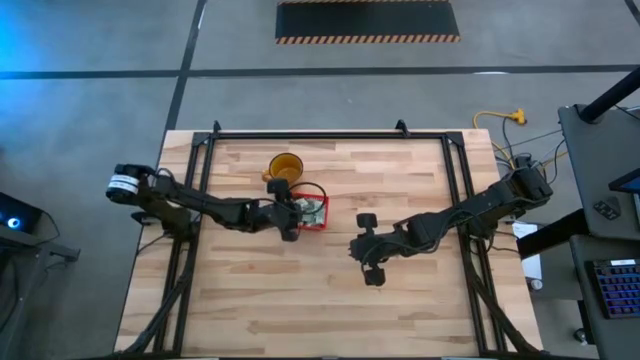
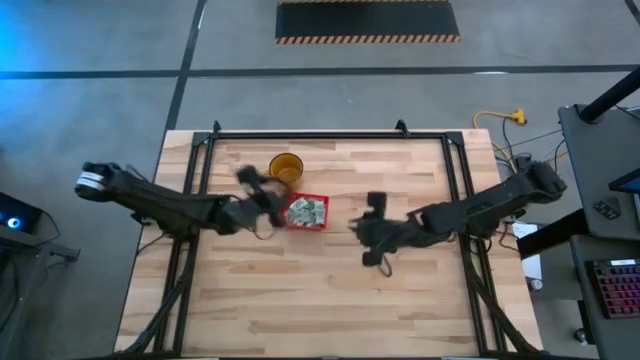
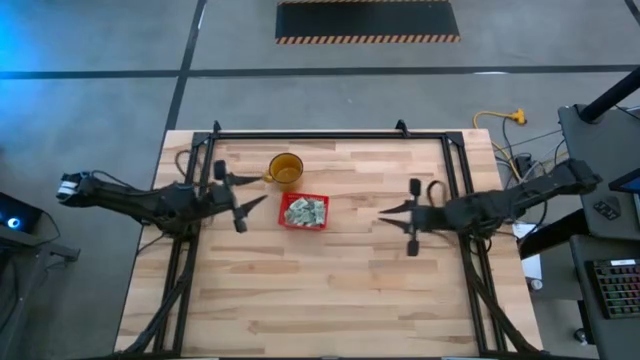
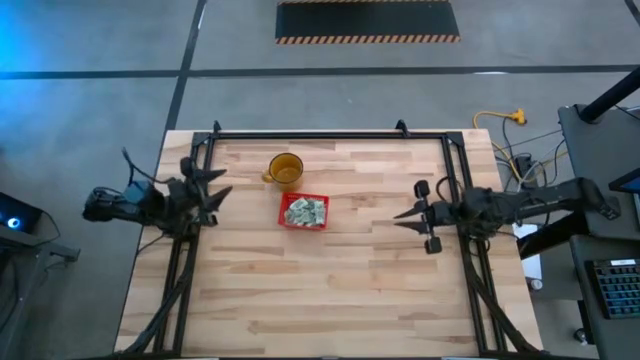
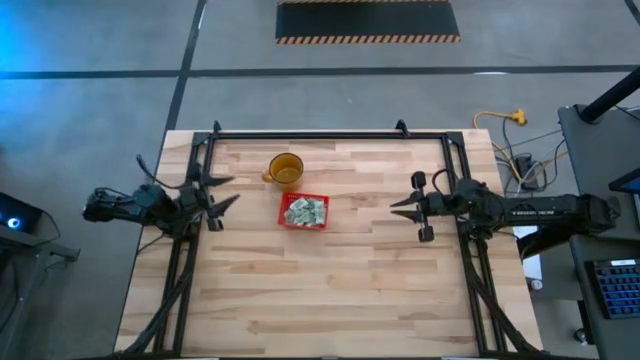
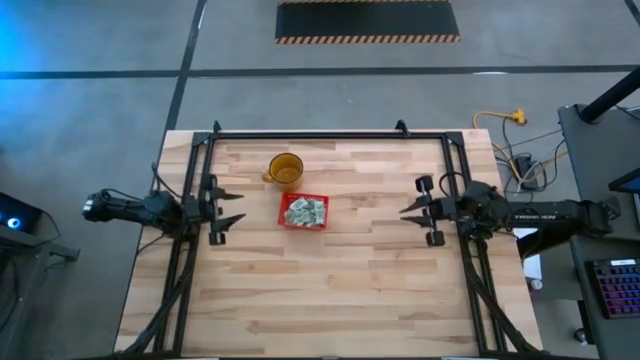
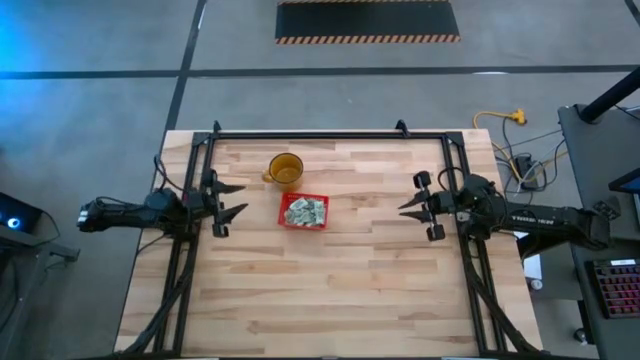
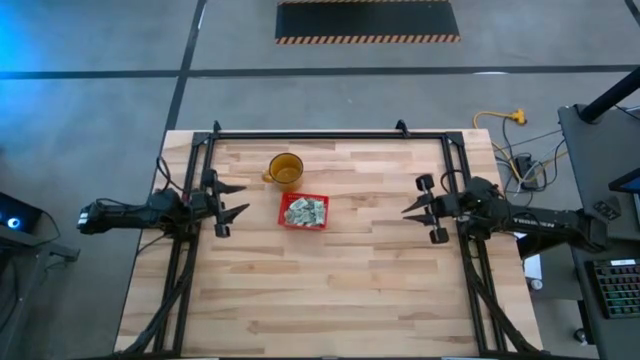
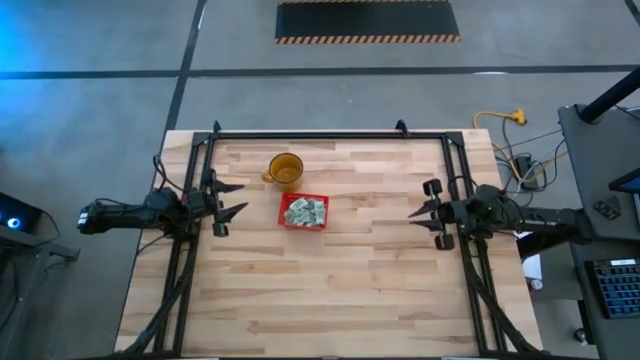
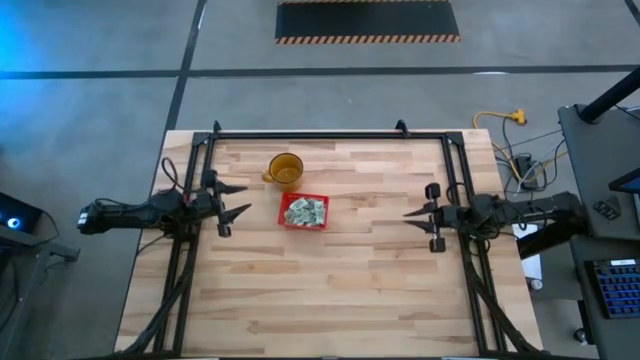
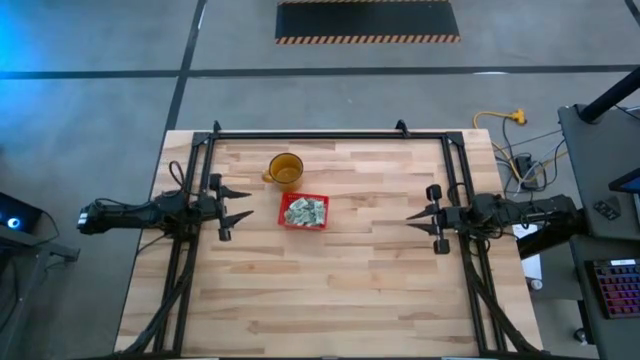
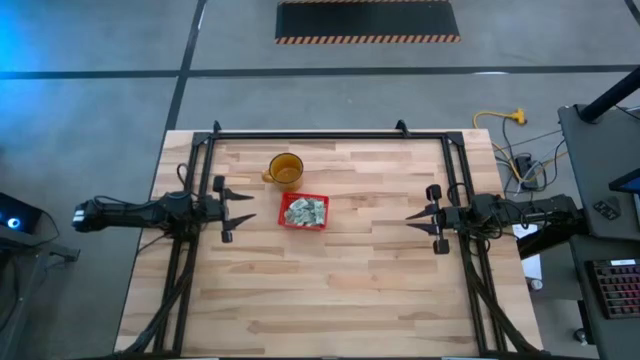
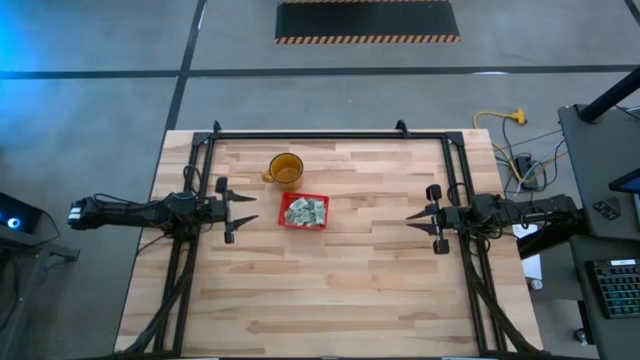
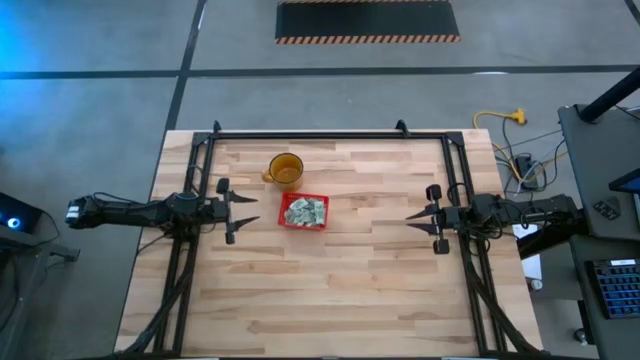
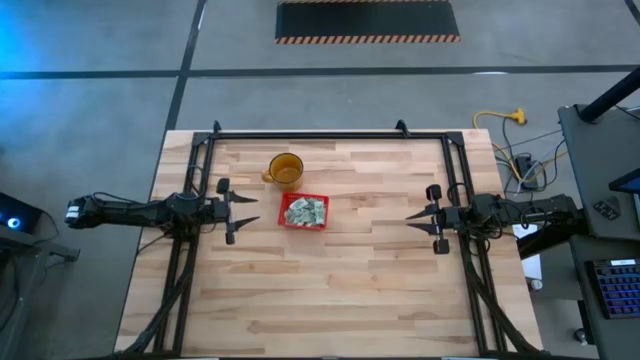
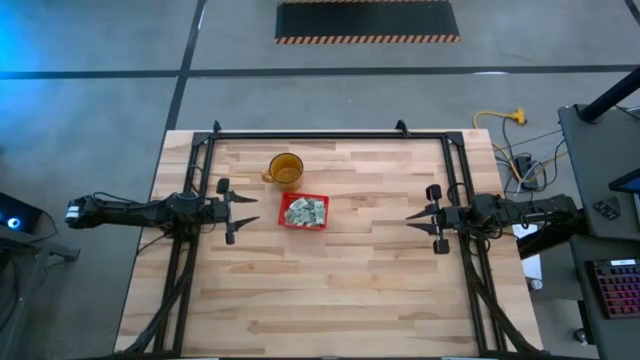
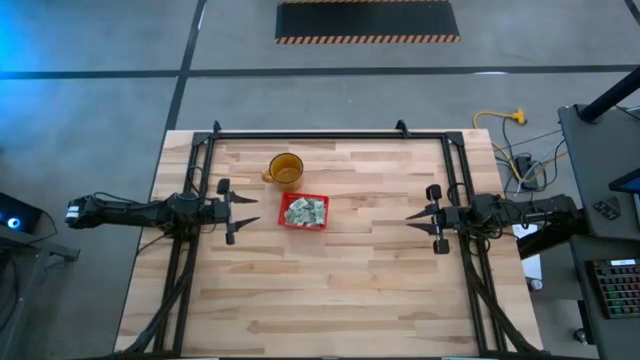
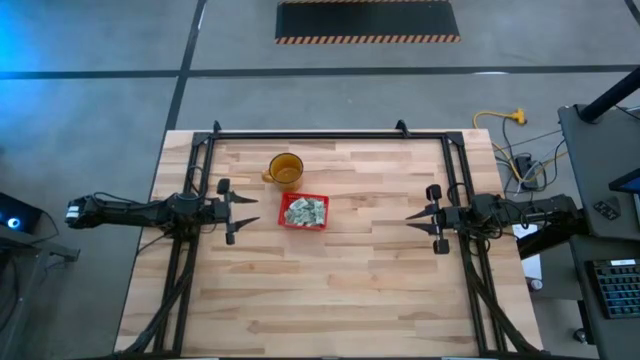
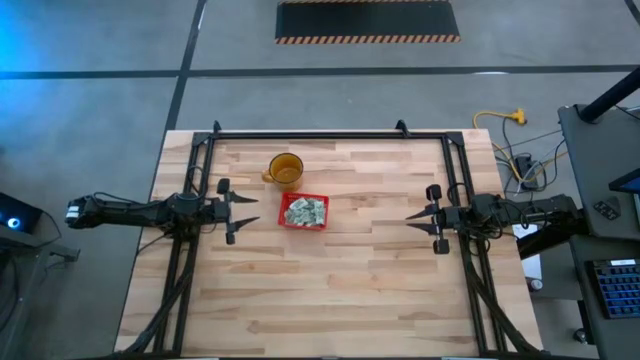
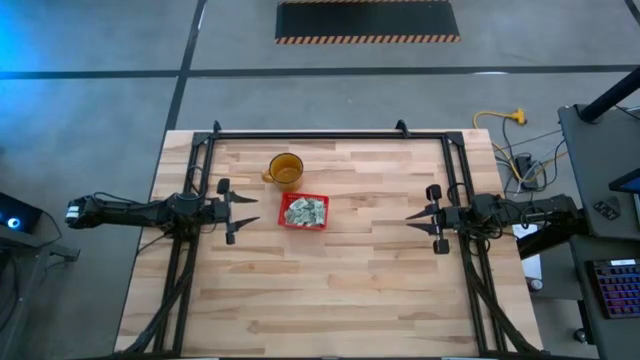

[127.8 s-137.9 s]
Task: Pick and place Stevia / Truvia into bins
Return to Home Position

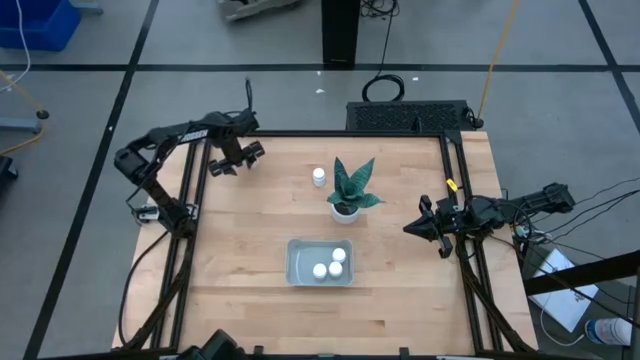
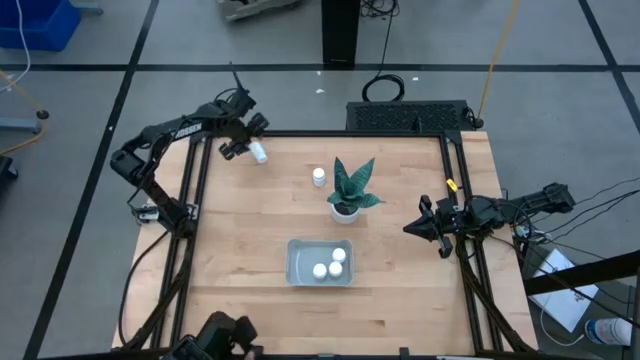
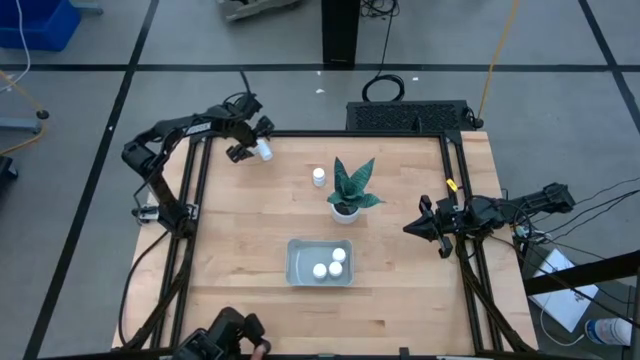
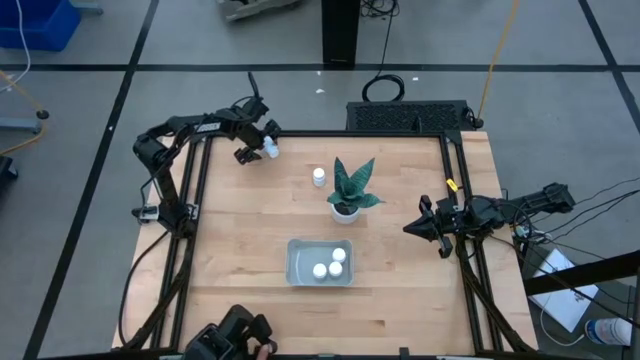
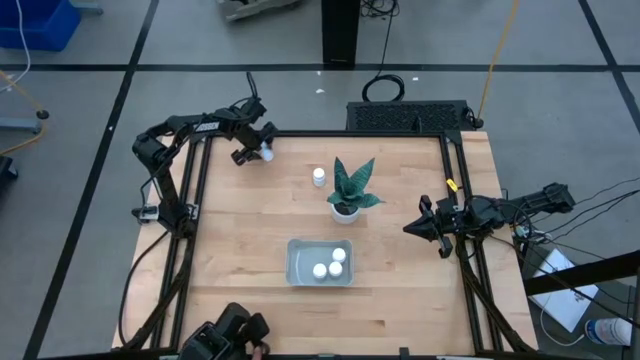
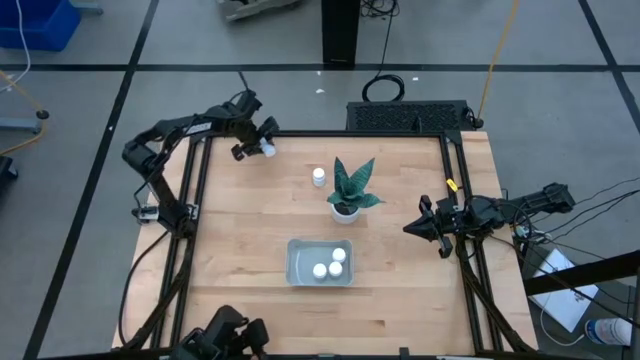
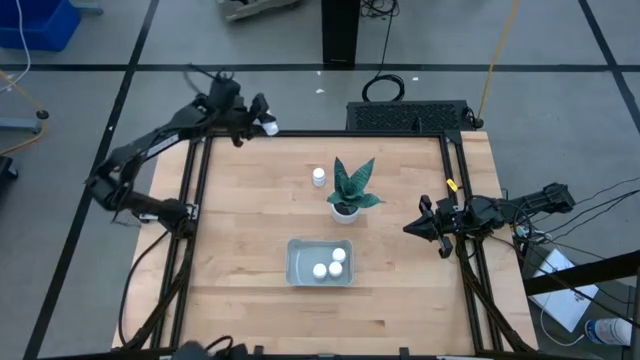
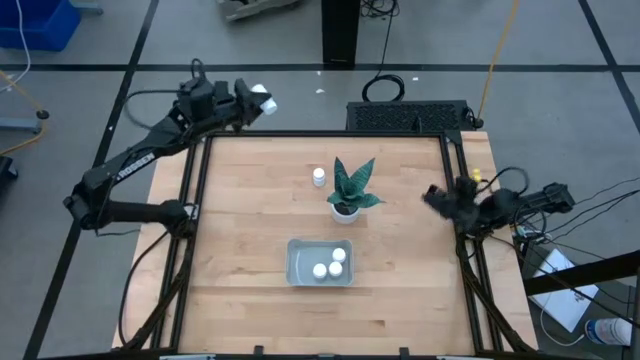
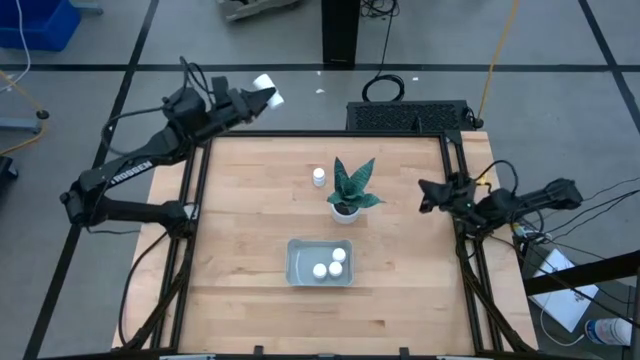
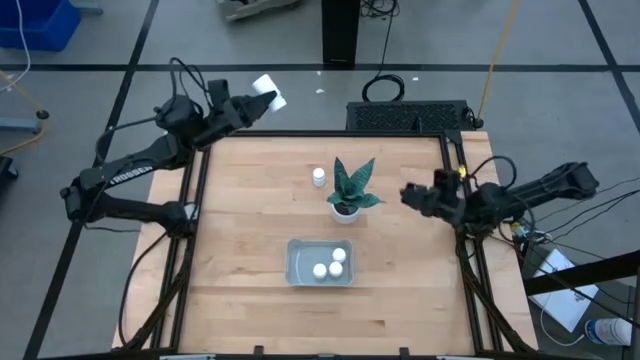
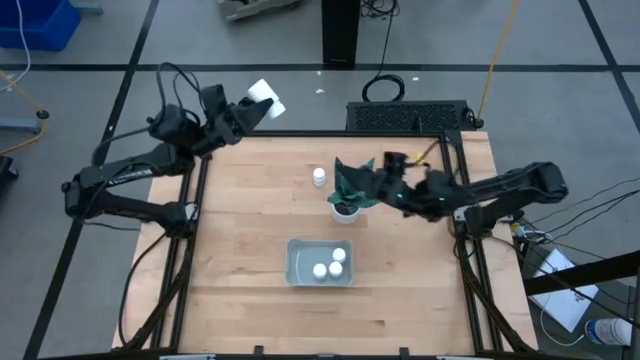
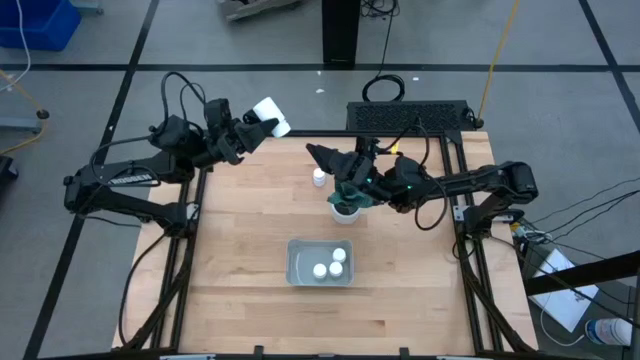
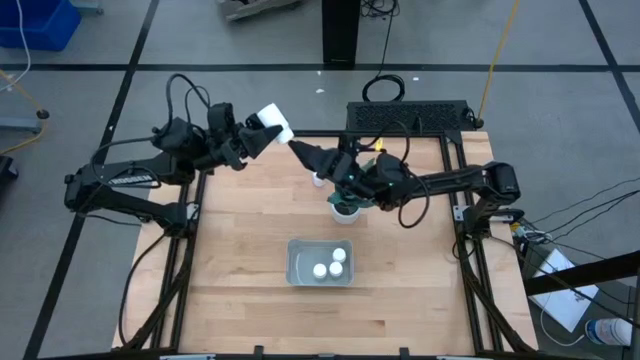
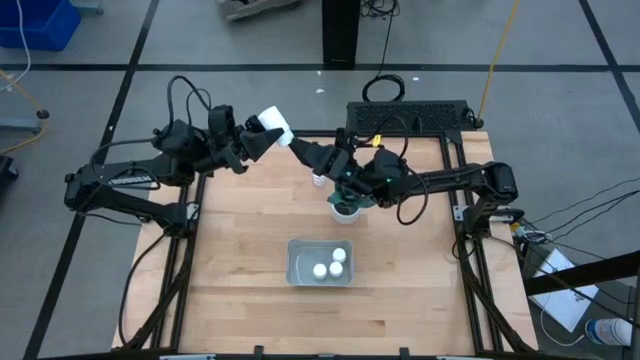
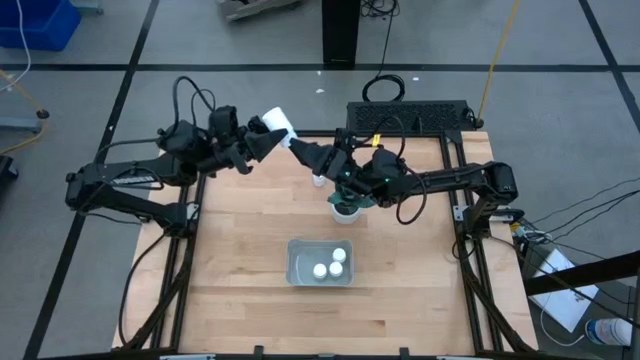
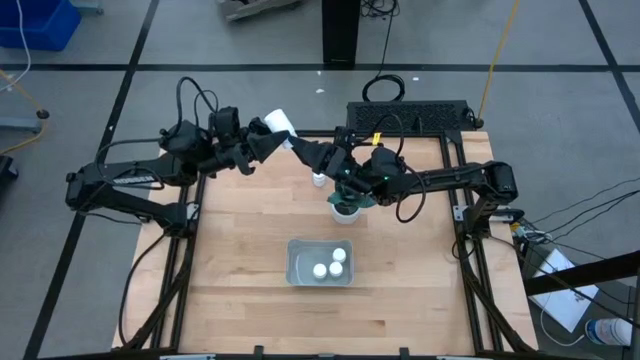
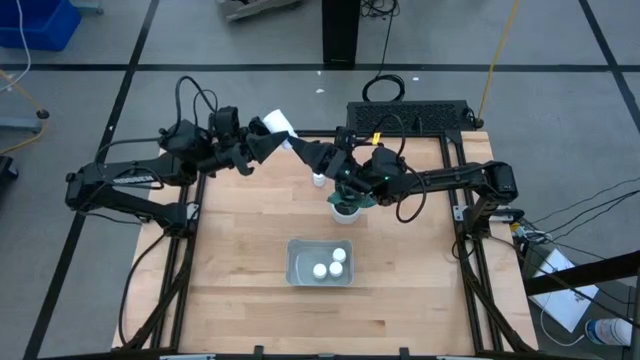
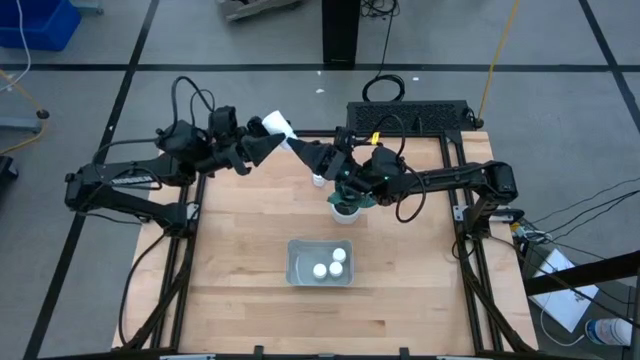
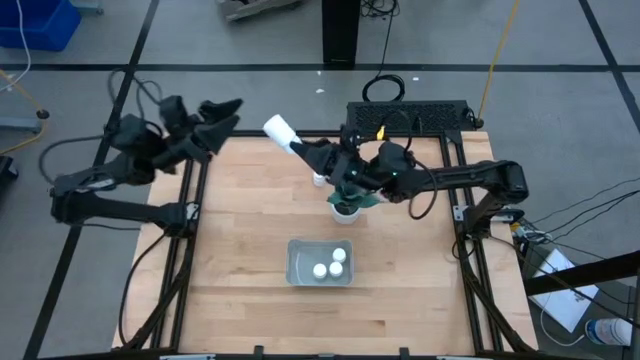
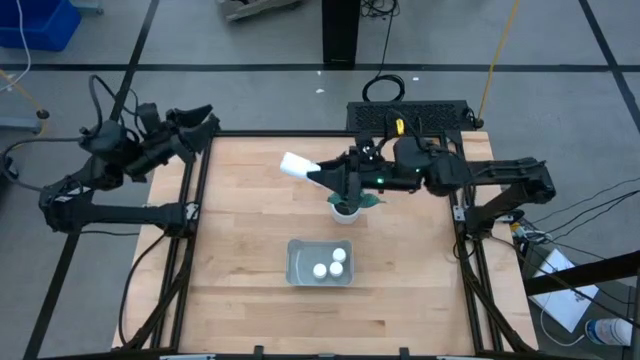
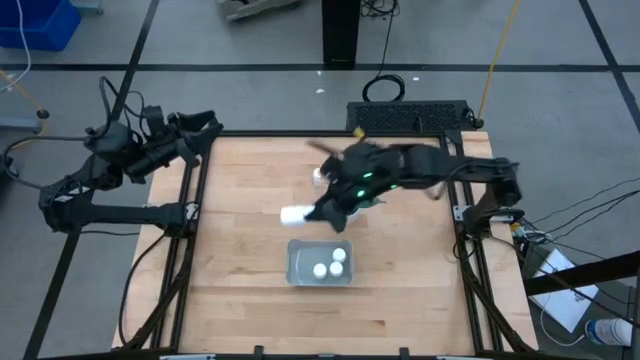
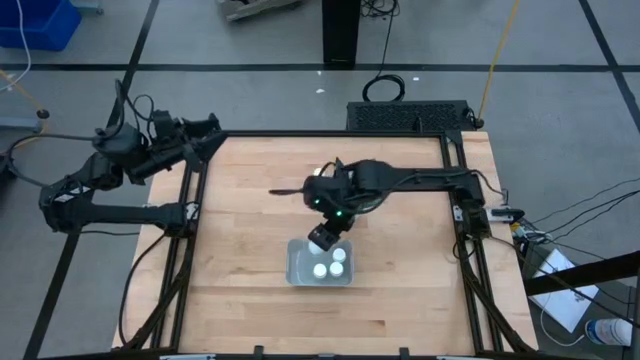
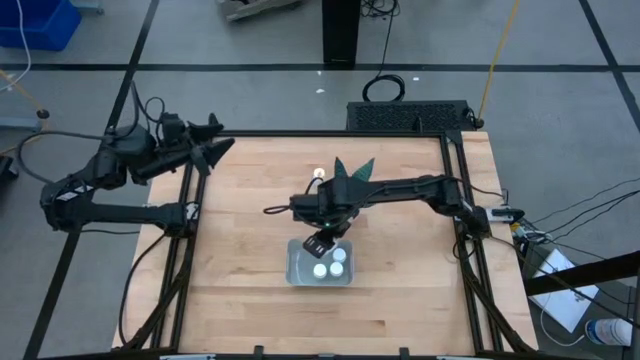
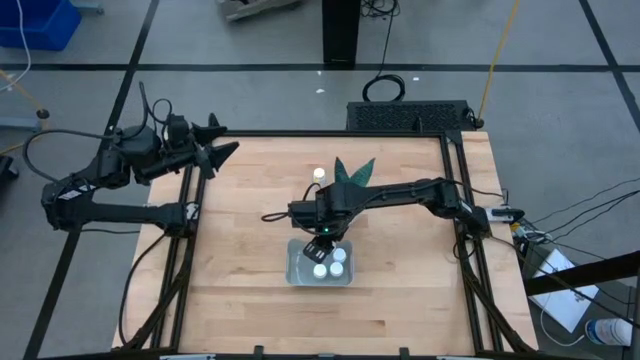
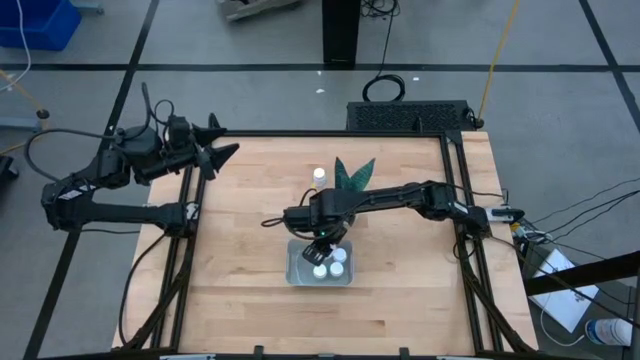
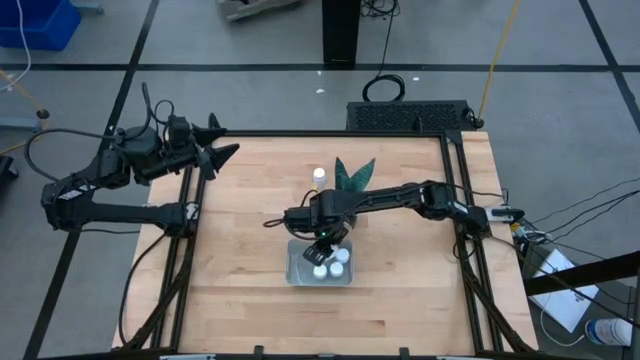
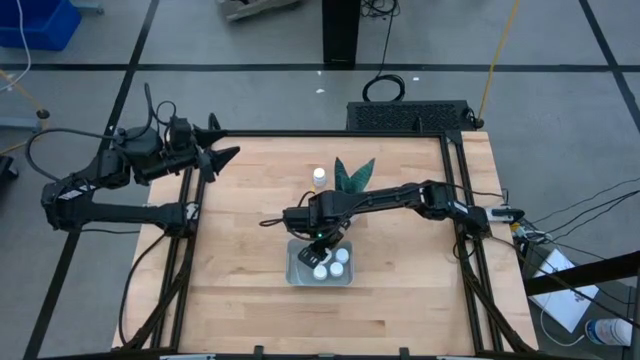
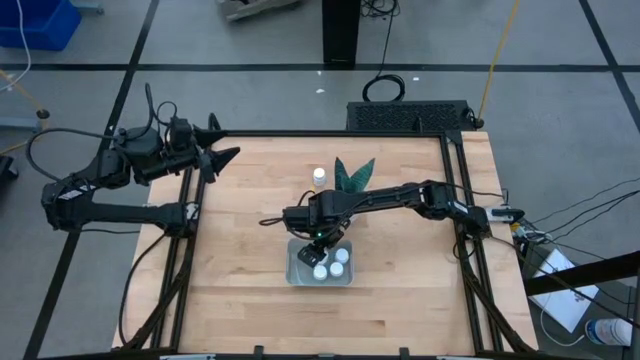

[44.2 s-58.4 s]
Task: Pick and place pill bottles into a basket
Put the white pill bottle into the white bin
